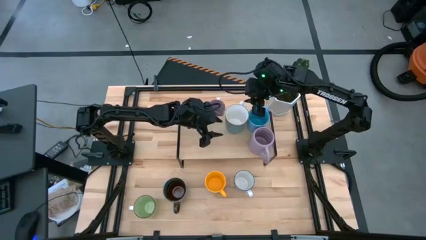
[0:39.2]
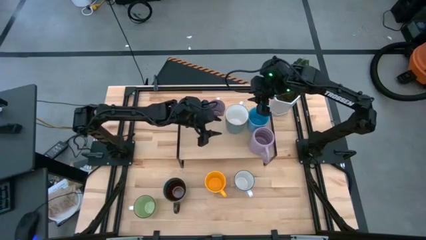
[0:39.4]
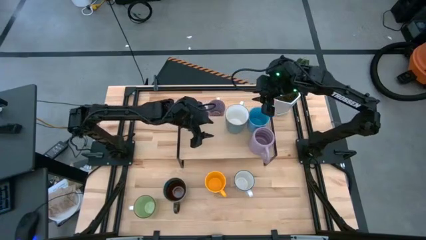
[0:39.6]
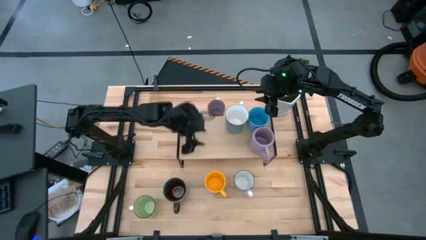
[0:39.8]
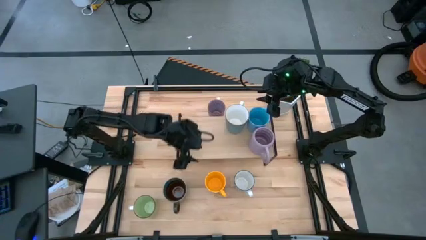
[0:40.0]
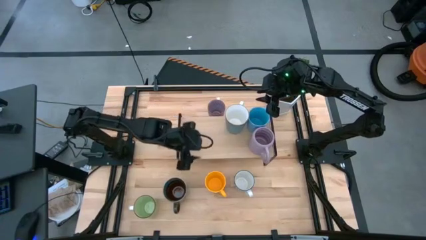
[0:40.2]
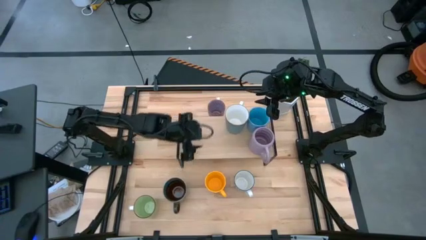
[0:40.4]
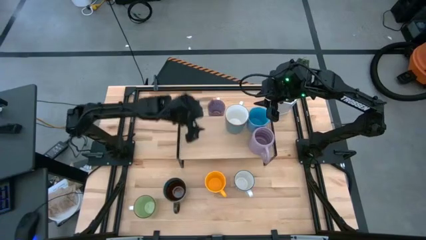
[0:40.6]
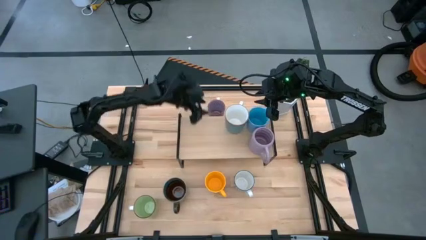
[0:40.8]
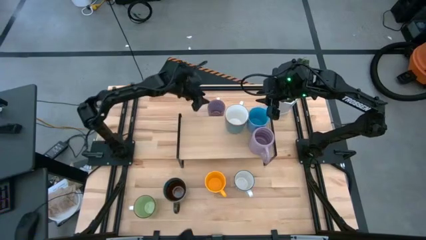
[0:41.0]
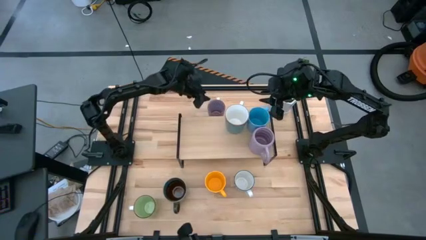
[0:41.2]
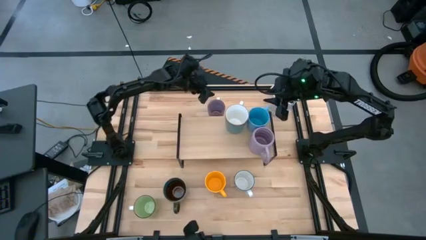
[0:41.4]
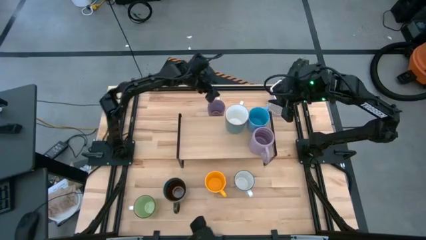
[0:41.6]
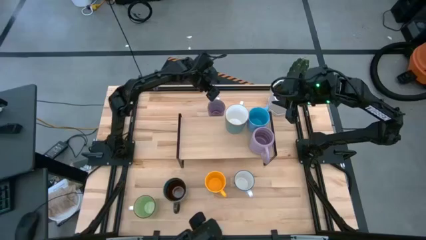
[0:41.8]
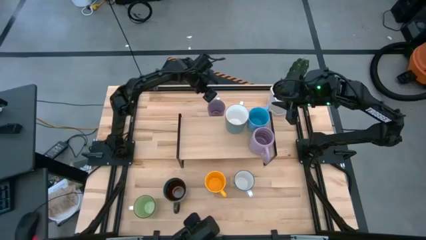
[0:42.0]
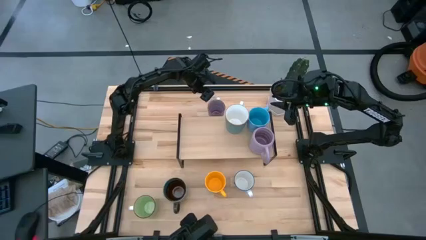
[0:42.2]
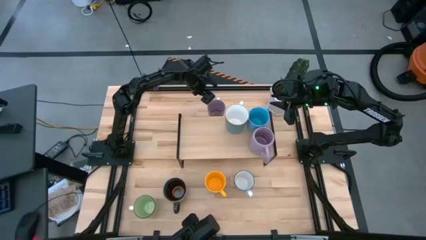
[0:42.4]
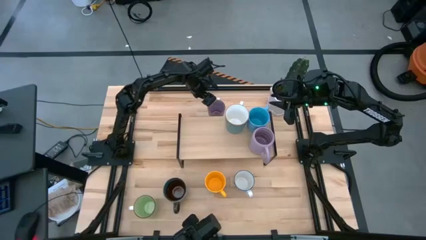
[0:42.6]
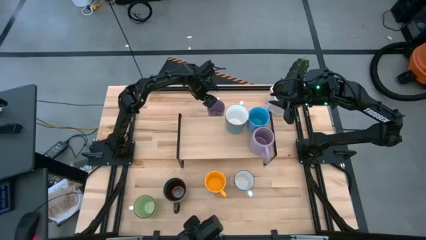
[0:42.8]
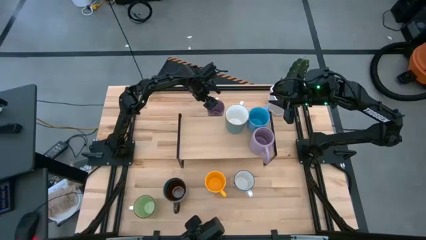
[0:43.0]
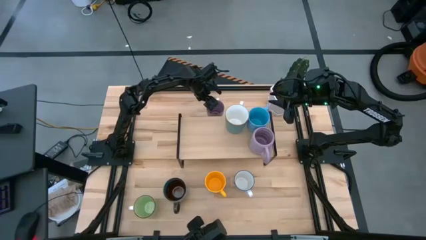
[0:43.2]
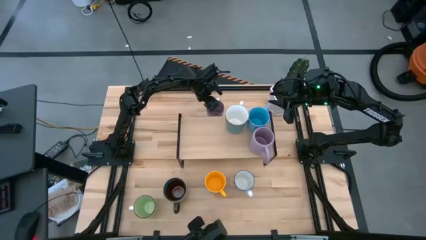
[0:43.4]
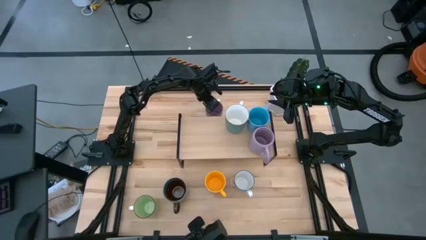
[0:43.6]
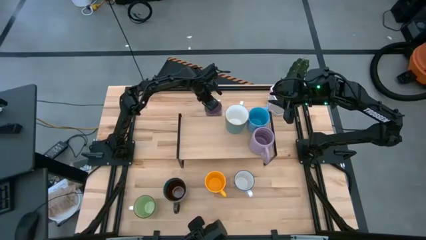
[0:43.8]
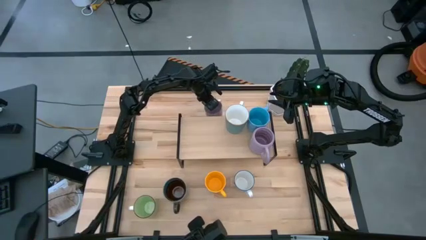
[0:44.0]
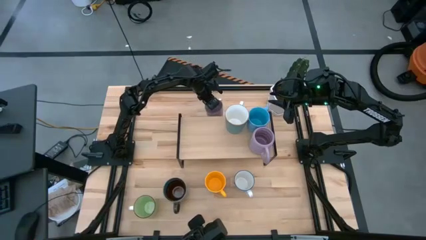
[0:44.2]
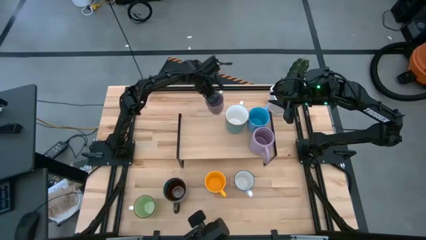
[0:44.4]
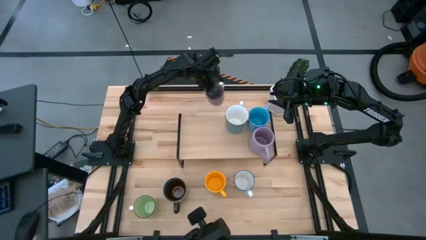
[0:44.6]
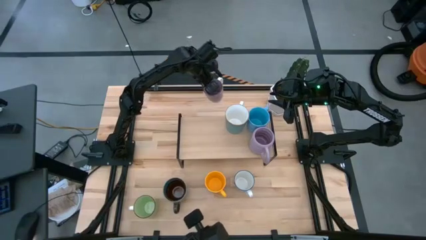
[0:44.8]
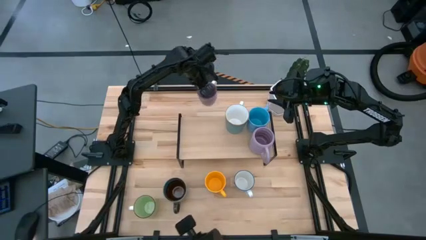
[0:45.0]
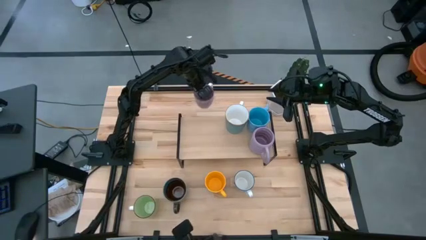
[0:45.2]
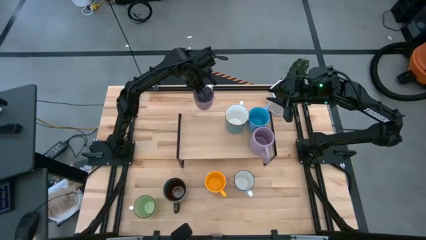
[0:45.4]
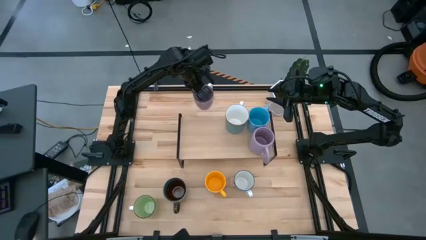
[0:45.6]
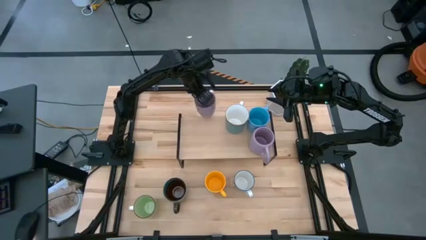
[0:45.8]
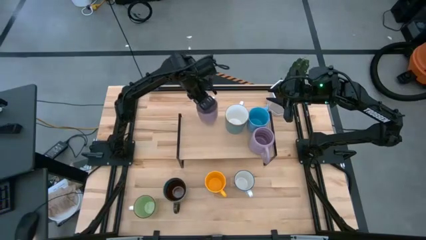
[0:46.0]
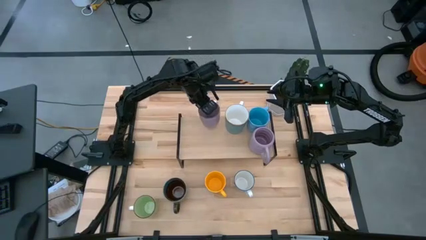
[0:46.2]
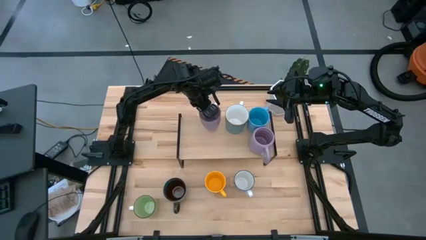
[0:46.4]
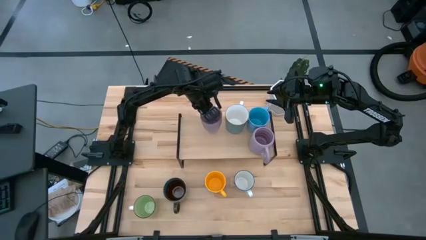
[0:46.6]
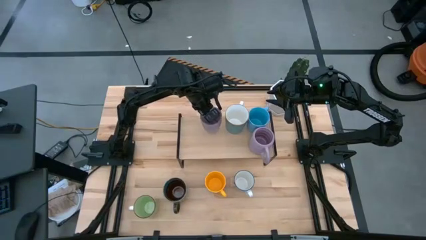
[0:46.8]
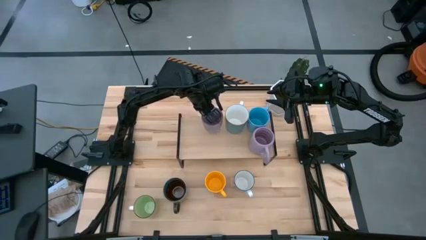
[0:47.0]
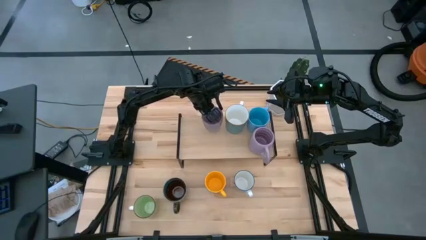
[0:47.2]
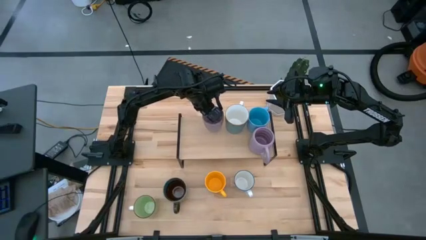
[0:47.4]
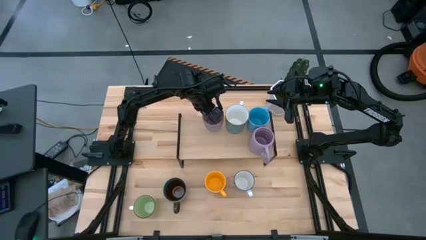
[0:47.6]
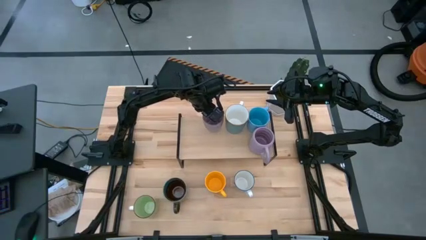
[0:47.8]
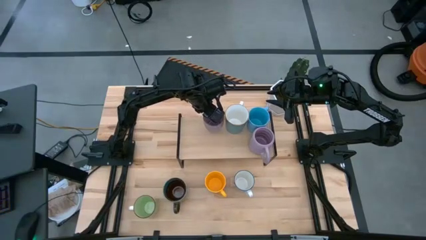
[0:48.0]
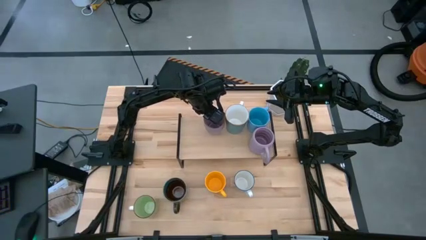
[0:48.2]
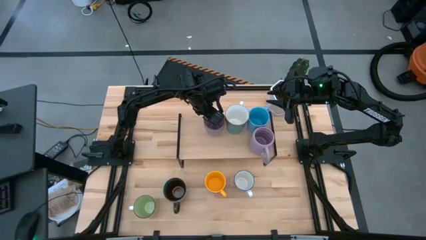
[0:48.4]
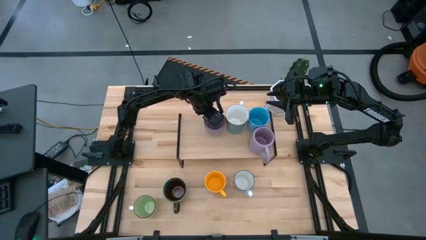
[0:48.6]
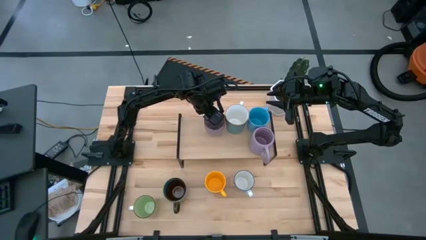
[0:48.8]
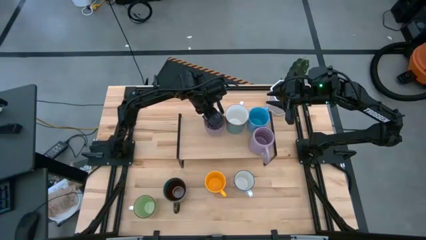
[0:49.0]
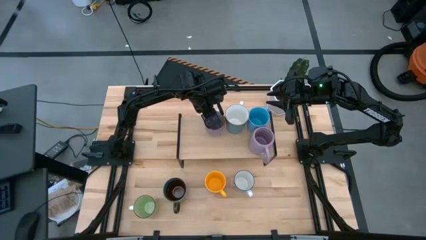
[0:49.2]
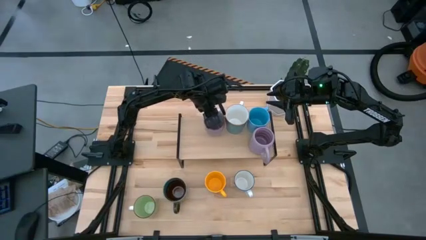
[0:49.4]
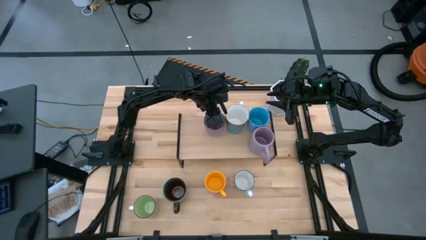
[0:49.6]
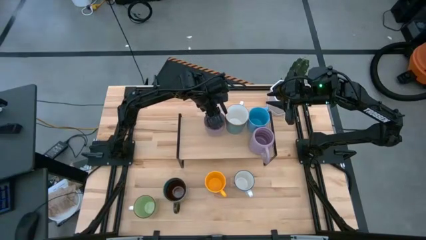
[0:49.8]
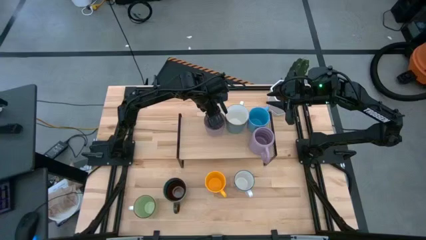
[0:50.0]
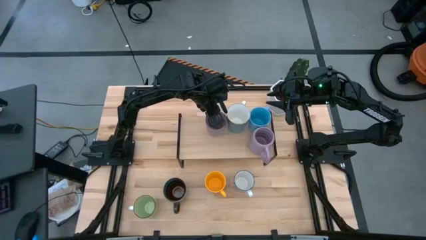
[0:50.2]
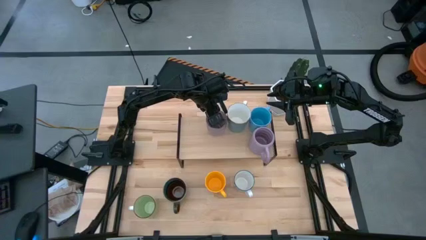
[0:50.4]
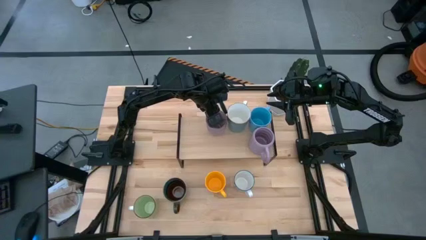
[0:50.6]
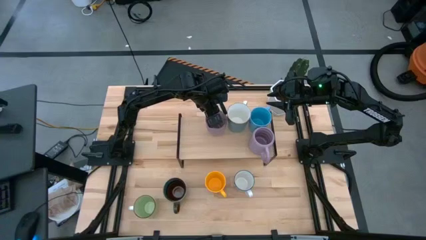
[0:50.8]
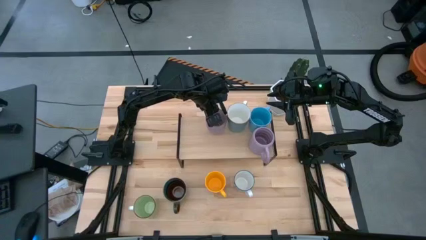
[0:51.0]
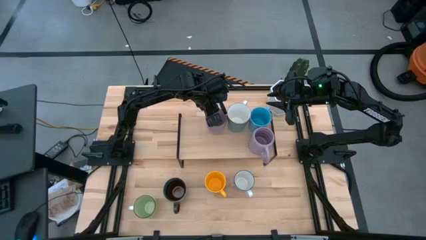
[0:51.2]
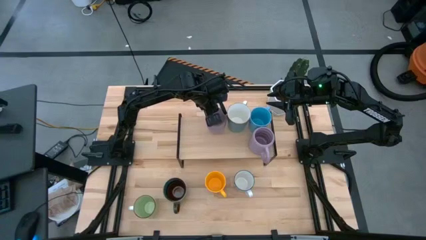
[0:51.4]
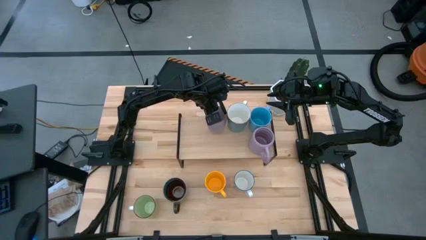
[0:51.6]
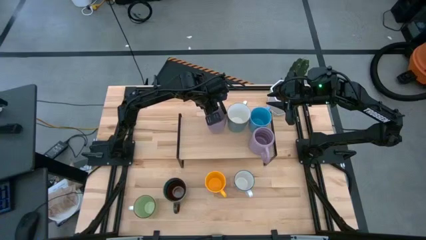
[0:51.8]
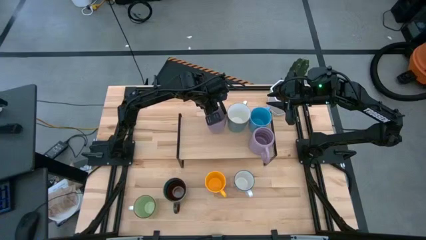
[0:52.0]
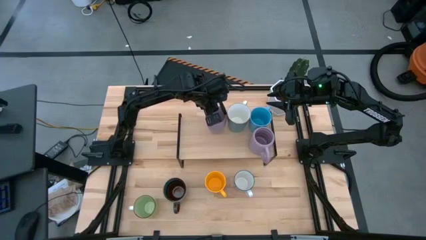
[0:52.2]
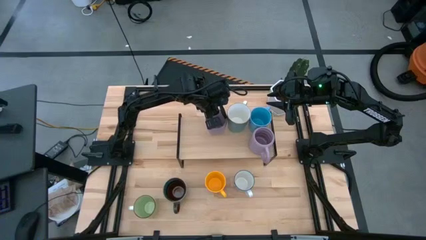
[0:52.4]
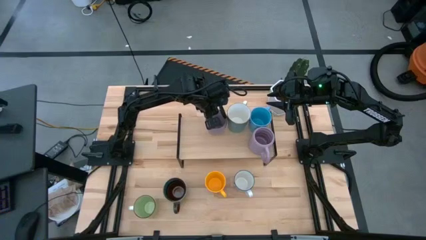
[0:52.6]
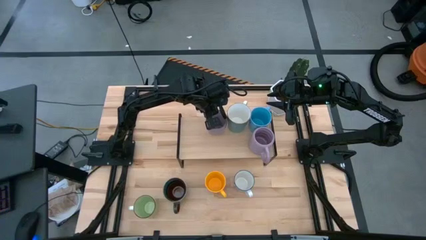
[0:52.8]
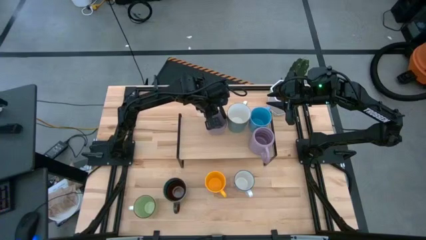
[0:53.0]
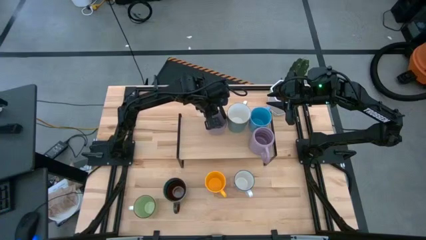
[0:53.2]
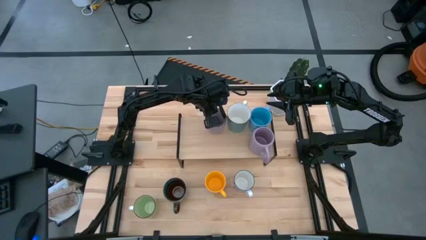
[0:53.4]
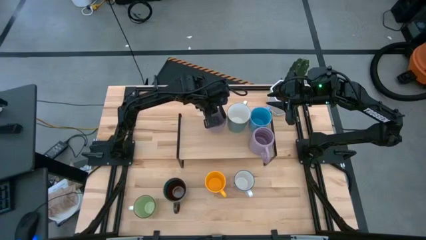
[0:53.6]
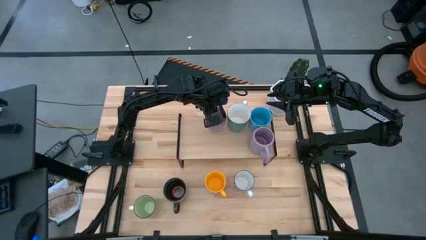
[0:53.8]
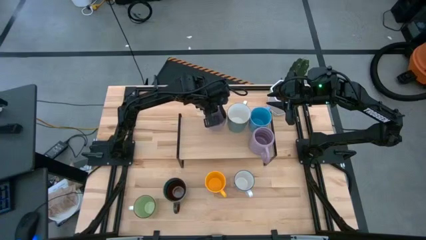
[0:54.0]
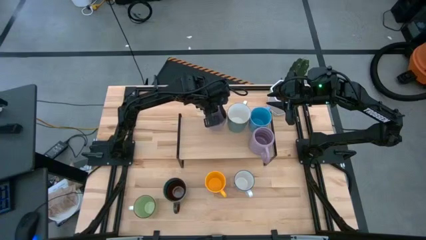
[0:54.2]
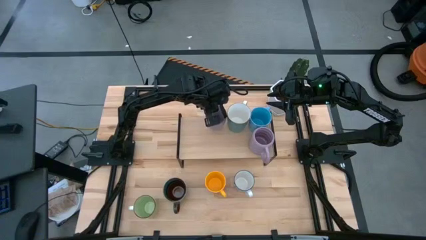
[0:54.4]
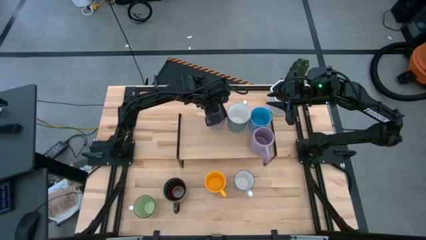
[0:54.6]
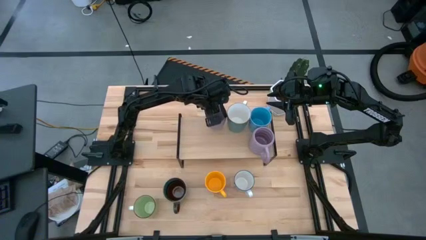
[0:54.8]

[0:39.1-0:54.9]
Task: Place coffee mugs
Put the purple cup on the shelf
